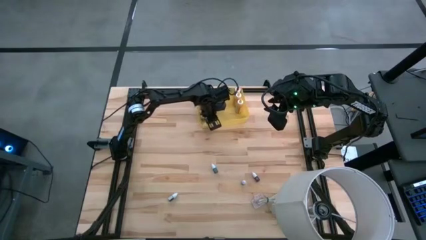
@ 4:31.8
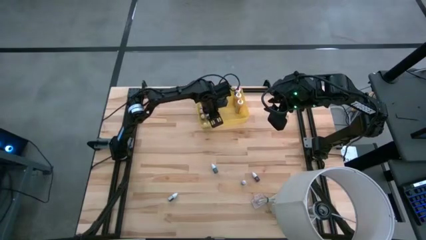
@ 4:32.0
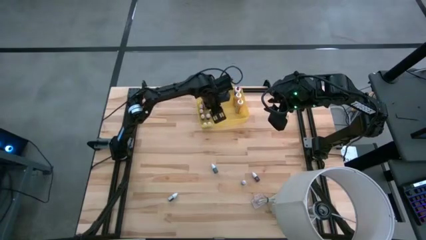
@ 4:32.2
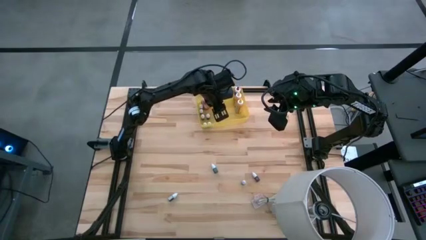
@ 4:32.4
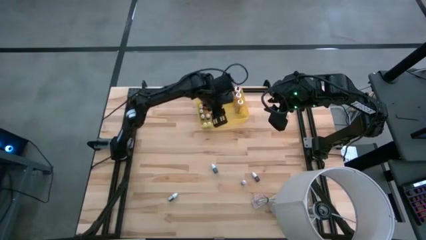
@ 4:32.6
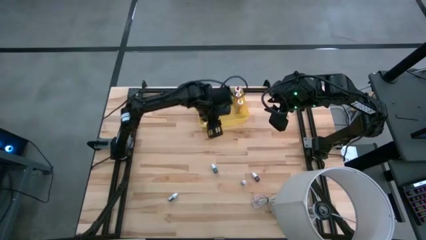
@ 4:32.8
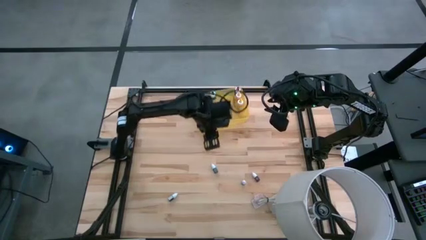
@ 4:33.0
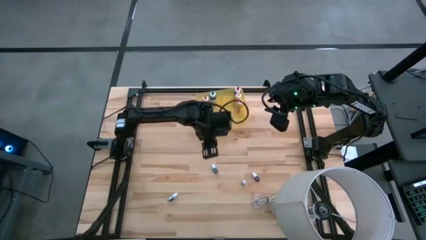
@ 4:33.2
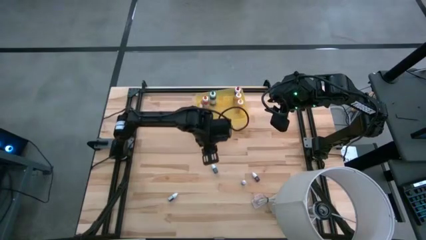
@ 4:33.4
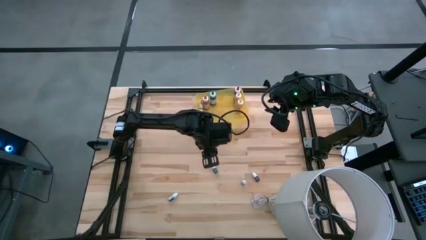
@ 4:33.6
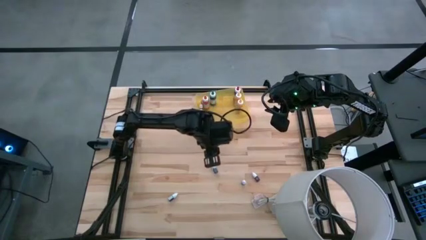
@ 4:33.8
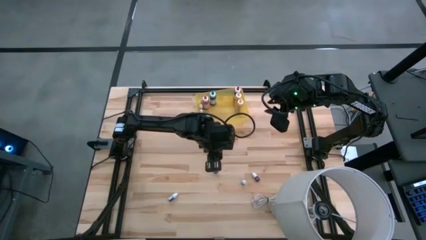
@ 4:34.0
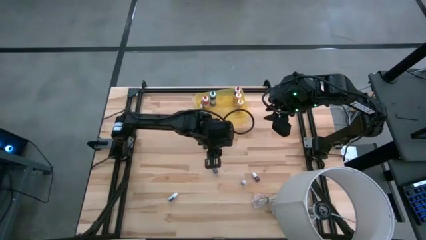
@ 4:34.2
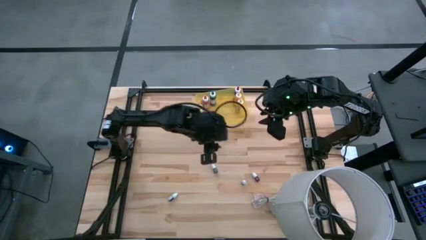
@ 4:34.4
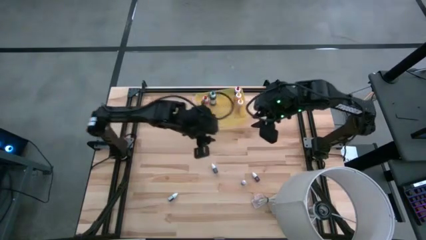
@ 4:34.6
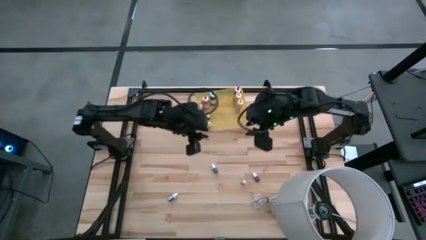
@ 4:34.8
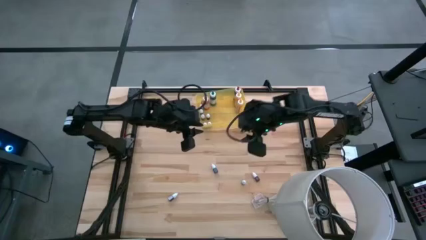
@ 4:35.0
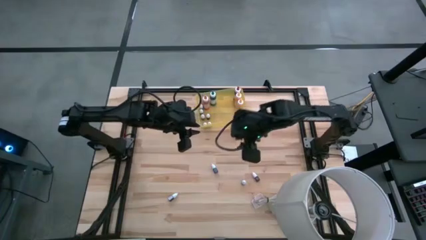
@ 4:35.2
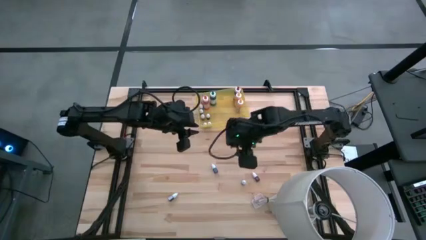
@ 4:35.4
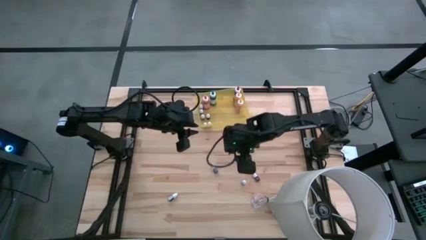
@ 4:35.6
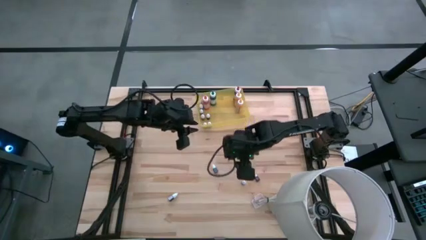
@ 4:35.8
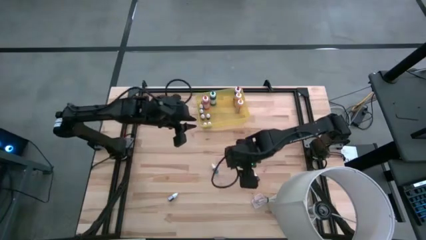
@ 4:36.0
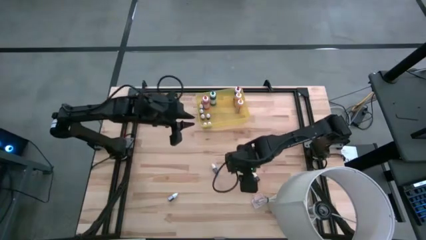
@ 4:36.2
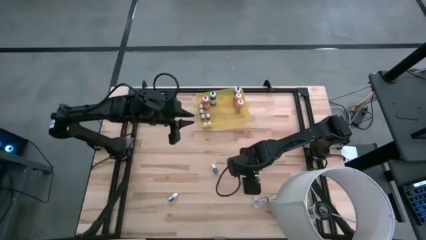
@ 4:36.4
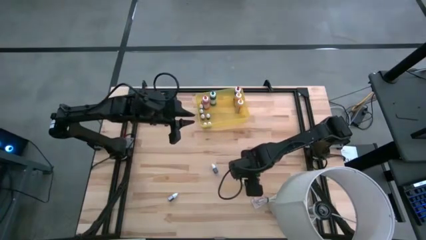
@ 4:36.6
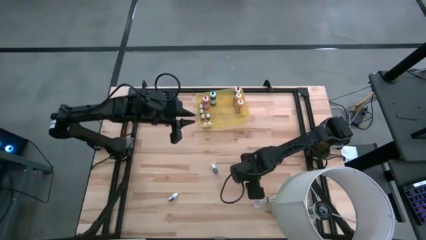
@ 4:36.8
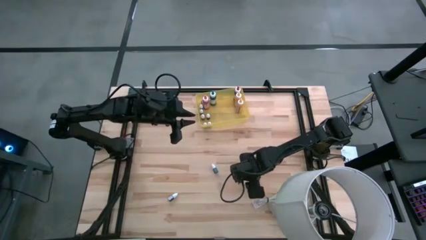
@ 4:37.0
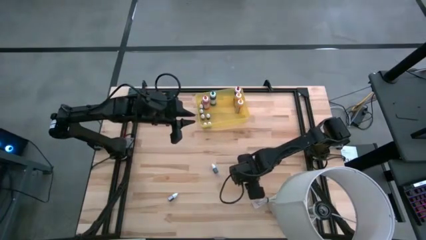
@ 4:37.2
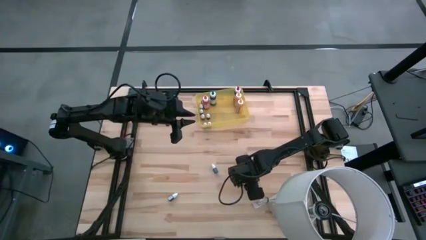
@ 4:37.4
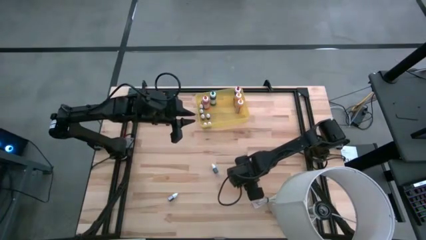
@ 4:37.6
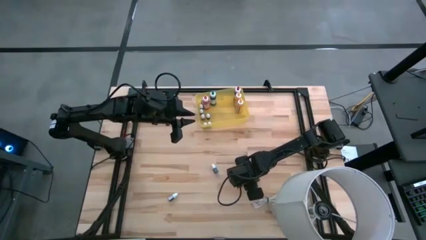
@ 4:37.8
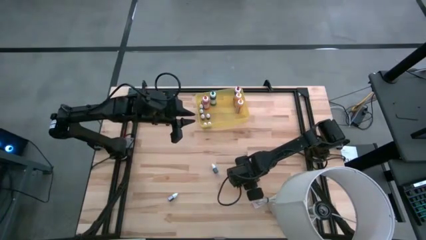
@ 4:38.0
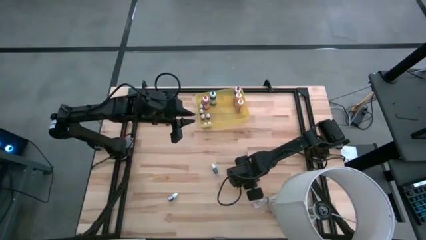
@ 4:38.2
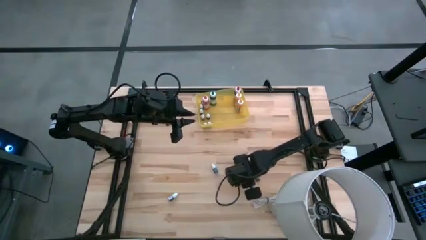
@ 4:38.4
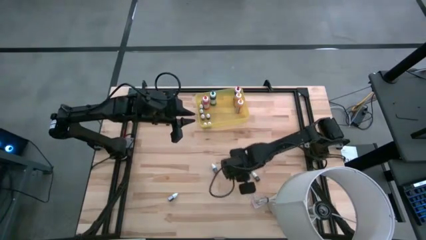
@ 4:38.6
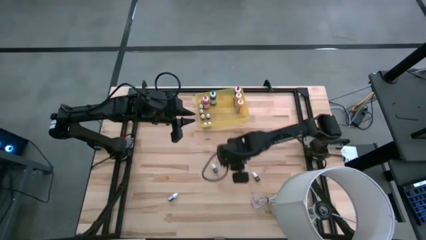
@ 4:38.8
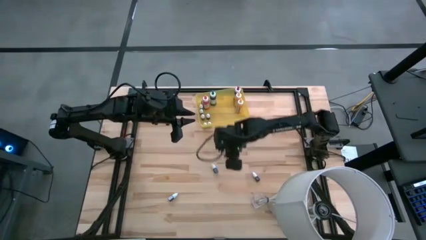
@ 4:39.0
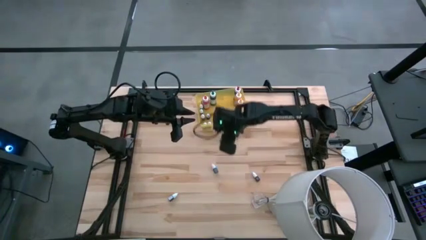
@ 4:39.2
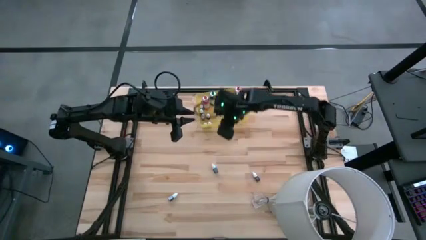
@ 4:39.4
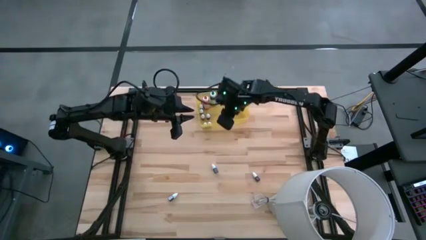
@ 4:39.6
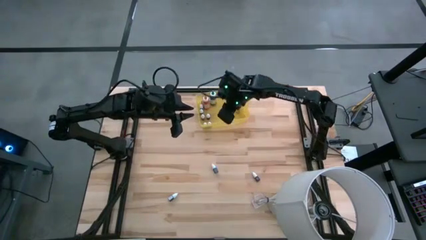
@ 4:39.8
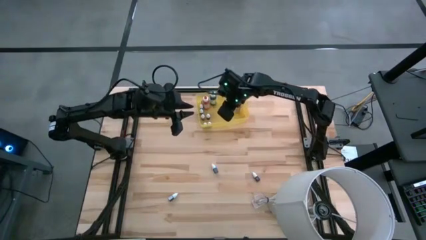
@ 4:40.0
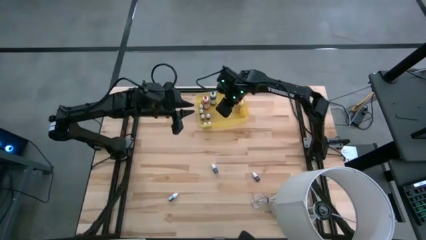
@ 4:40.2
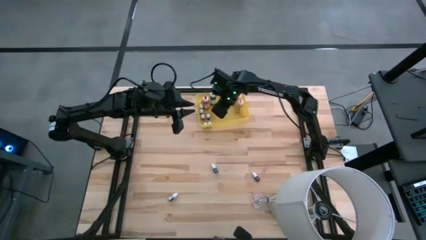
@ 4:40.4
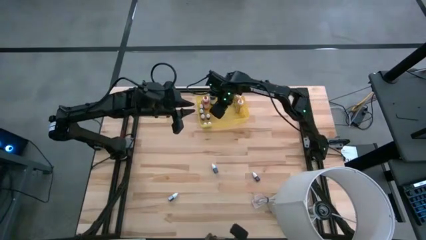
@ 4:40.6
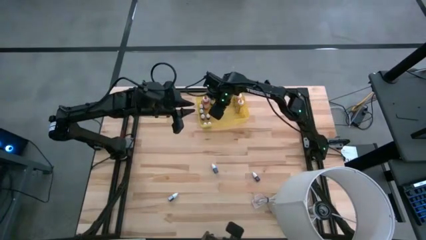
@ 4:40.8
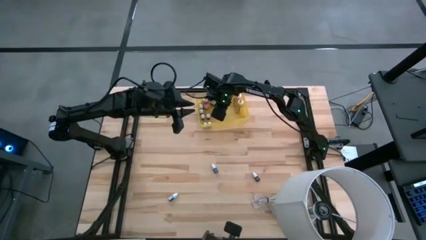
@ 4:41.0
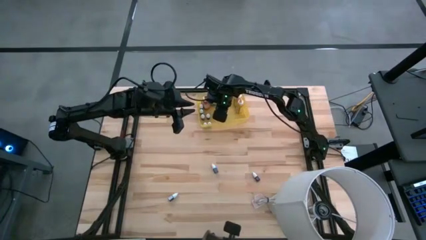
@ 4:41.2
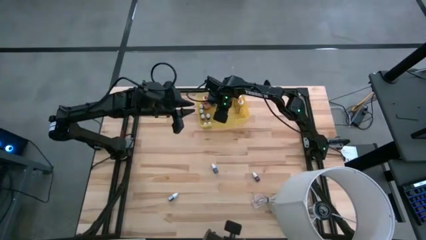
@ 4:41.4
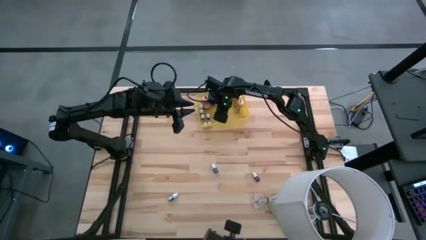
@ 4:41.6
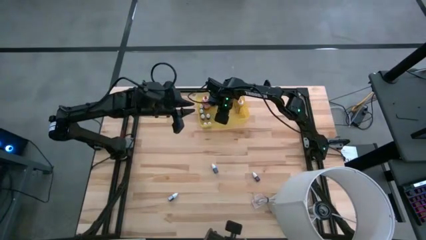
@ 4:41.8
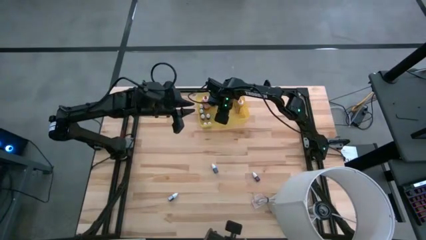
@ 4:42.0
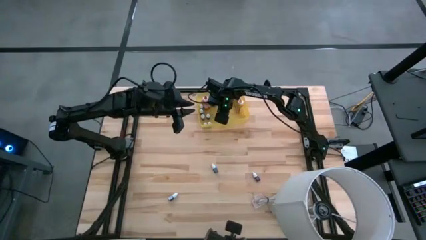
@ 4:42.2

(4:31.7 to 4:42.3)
Task: Pick & Place food coloring
Put the small green food coloring bottle into the yellow bin
